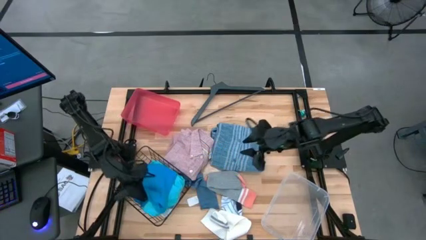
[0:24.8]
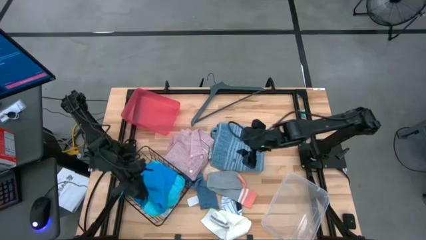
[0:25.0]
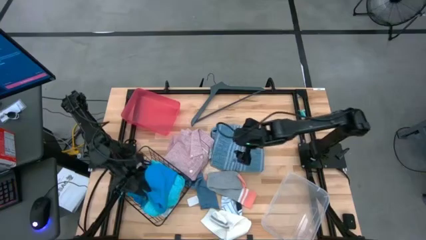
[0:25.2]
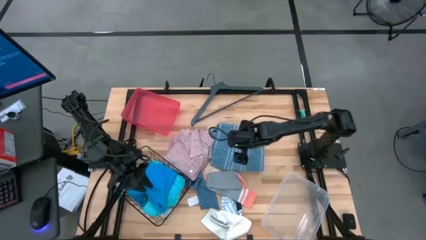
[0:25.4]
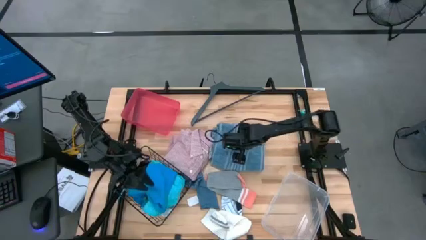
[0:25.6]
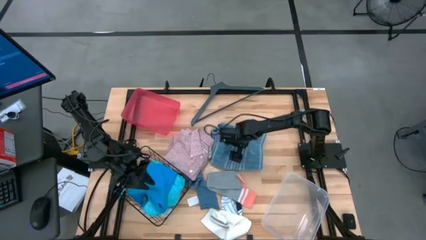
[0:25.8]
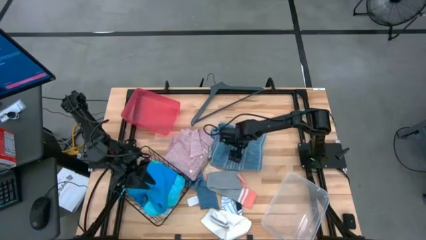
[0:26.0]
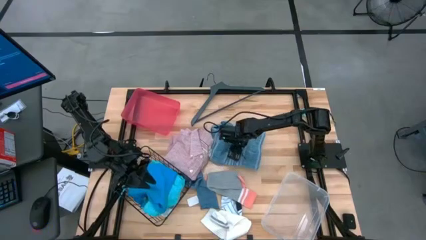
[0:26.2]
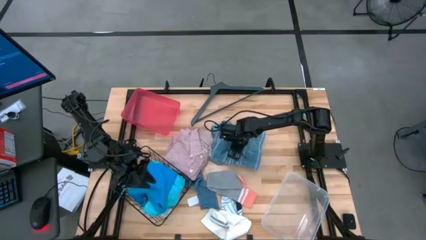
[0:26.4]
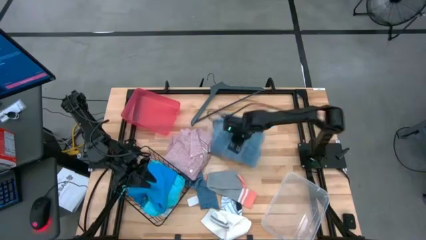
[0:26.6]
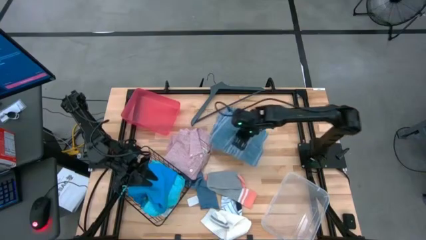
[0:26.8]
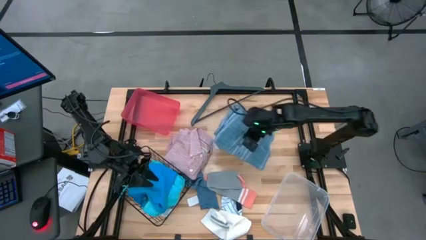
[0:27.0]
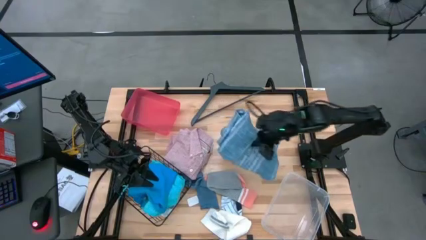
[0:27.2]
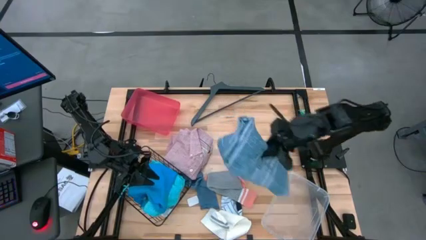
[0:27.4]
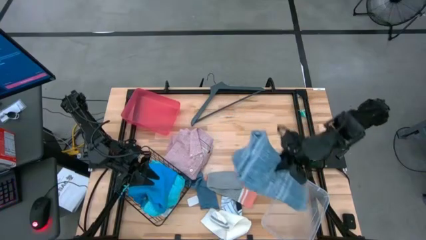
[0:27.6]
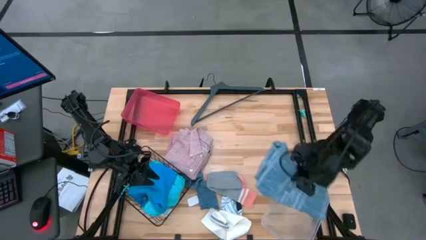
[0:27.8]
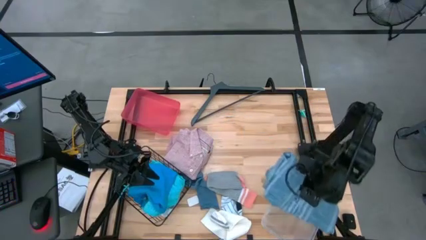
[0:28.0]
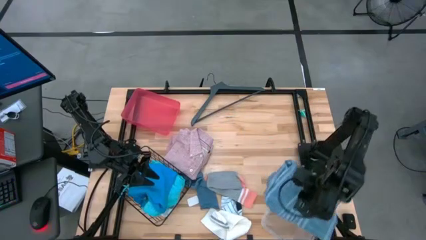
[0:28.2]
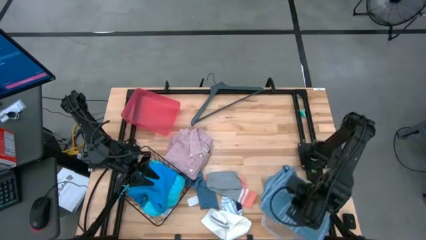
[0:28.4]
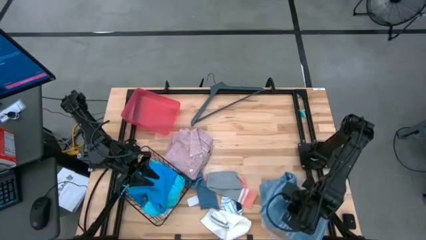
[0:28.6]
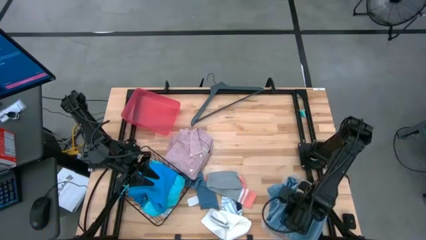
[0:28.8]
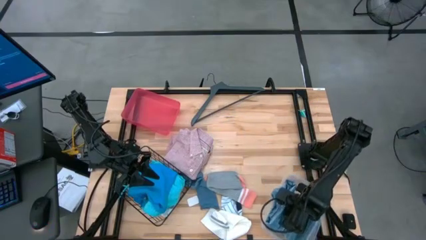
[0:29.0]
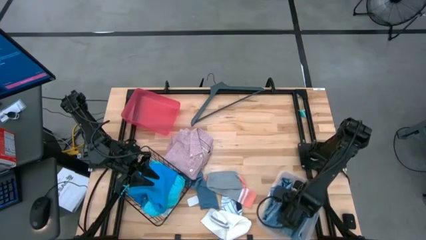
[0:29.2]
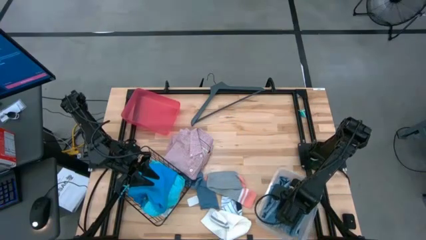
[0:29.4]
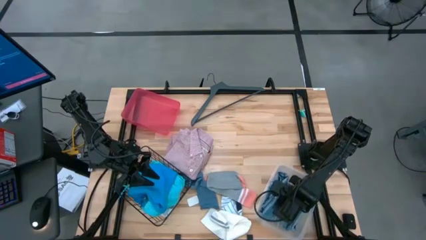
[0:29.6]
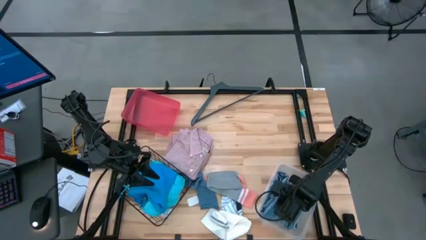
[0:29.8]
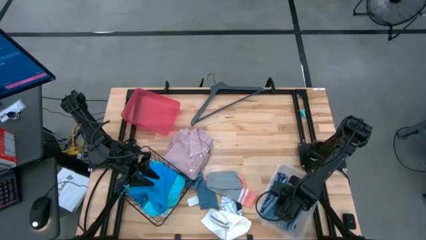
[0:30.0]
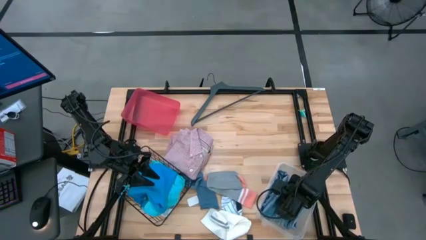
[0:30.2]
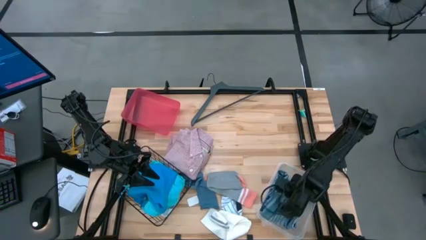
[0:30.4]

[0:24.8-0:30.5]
Task: Pick & Place Cloths
Put the blue polo into the transparent container

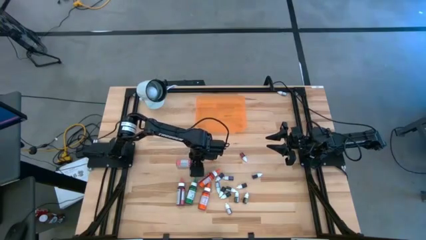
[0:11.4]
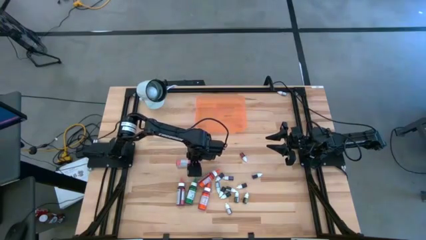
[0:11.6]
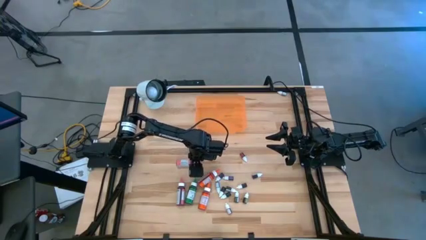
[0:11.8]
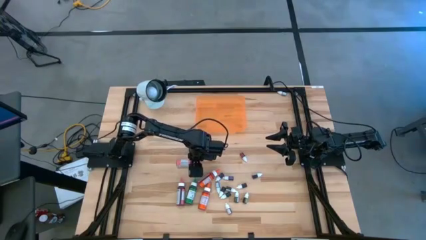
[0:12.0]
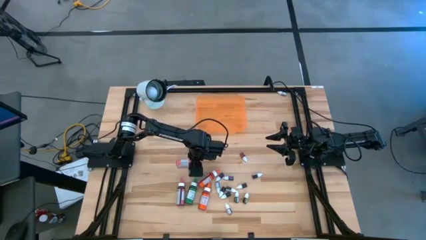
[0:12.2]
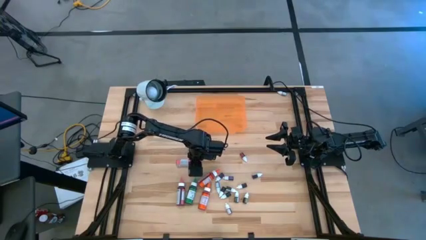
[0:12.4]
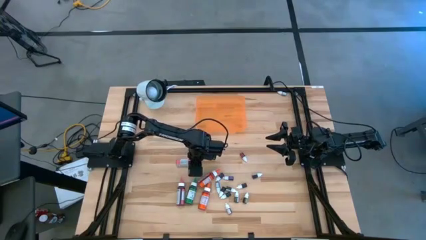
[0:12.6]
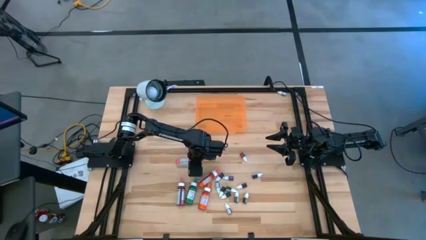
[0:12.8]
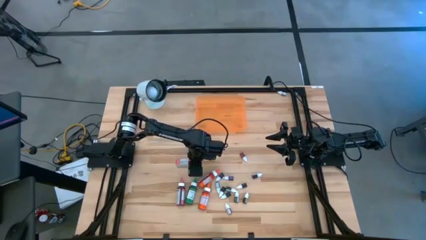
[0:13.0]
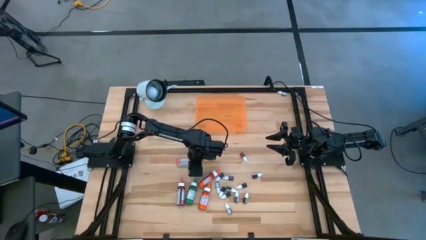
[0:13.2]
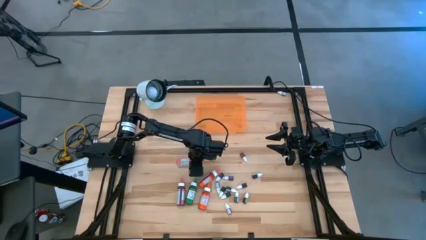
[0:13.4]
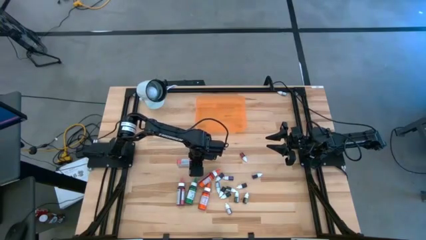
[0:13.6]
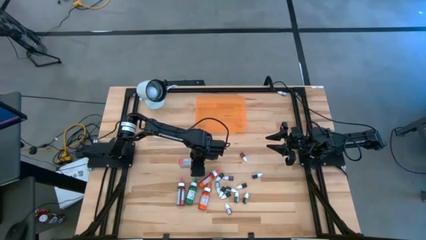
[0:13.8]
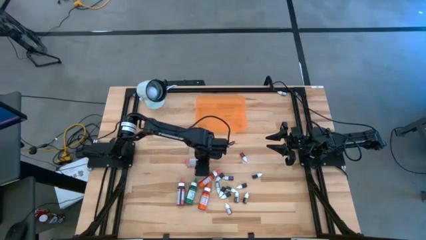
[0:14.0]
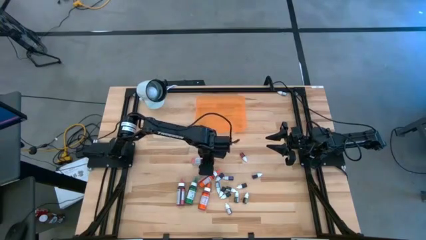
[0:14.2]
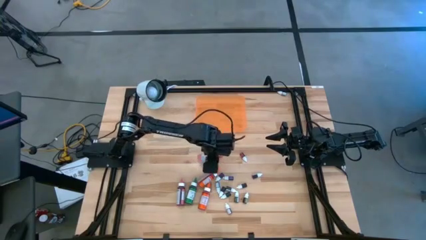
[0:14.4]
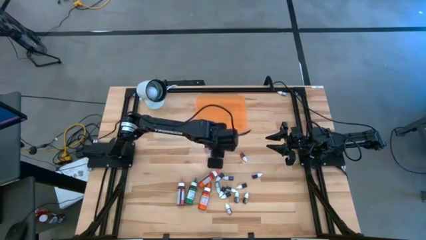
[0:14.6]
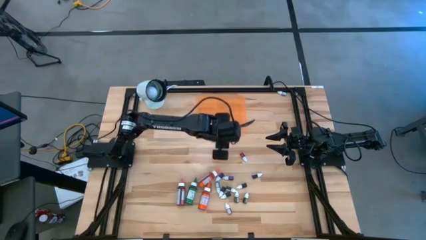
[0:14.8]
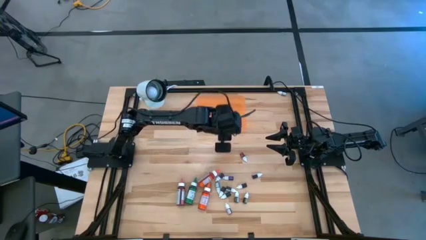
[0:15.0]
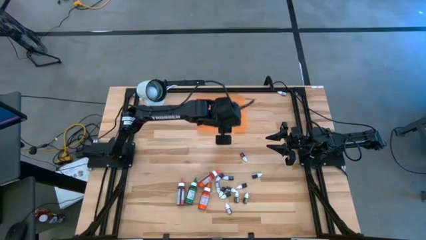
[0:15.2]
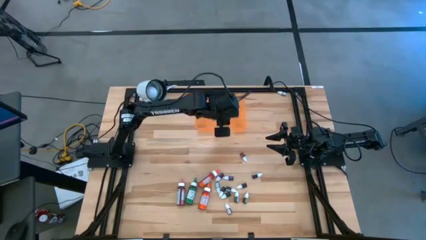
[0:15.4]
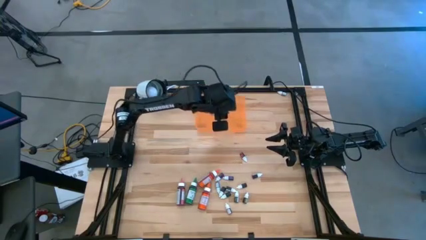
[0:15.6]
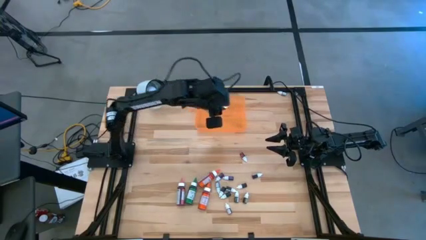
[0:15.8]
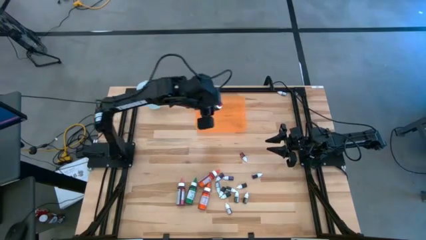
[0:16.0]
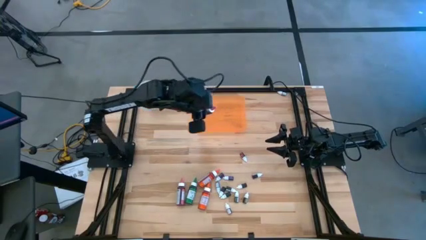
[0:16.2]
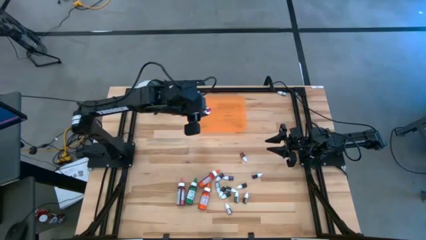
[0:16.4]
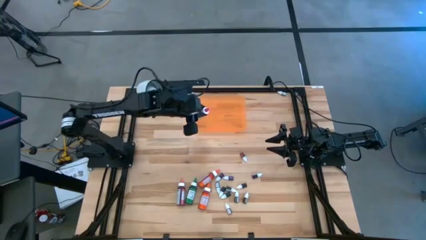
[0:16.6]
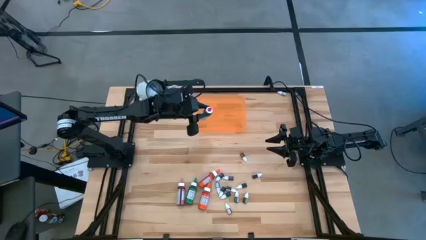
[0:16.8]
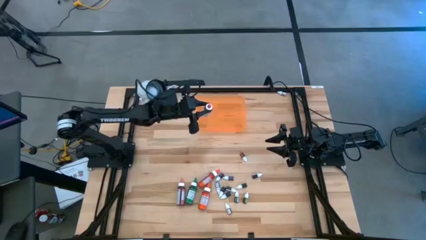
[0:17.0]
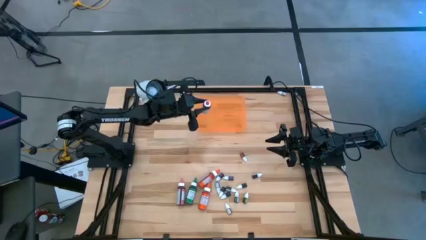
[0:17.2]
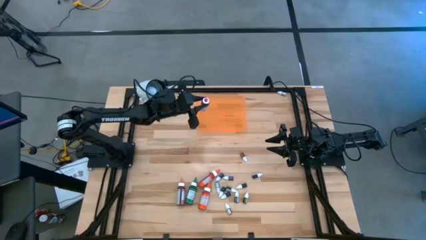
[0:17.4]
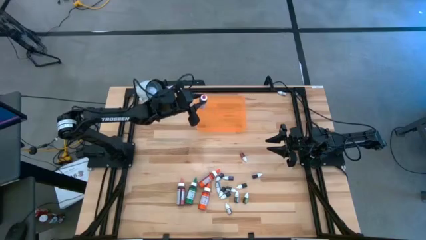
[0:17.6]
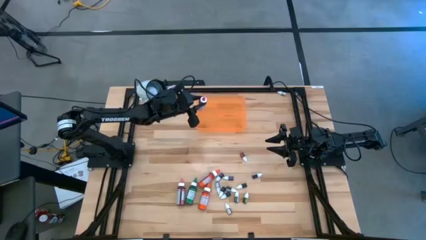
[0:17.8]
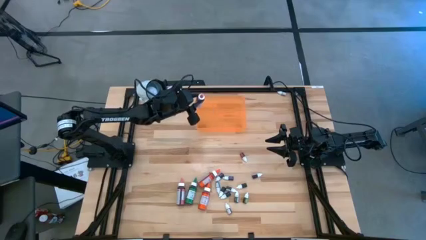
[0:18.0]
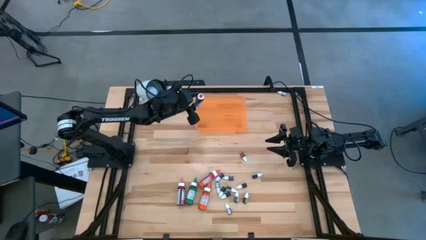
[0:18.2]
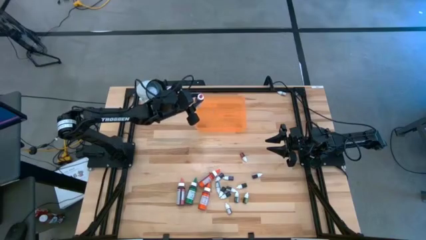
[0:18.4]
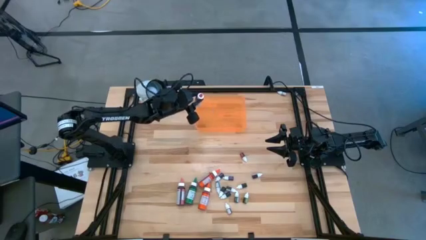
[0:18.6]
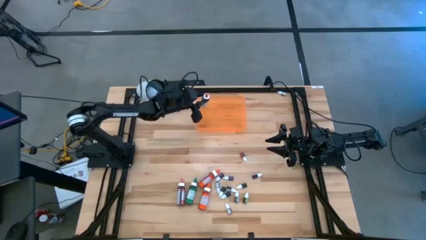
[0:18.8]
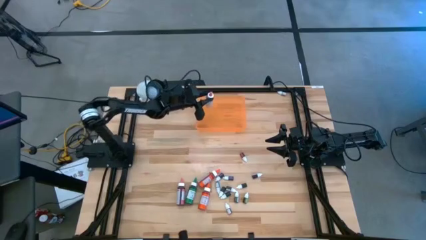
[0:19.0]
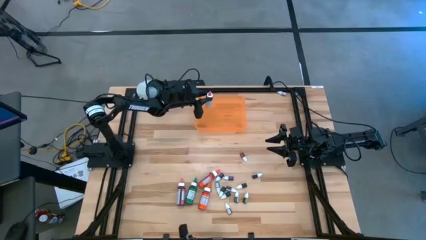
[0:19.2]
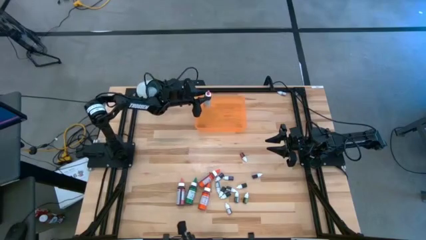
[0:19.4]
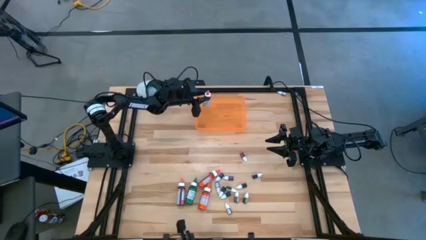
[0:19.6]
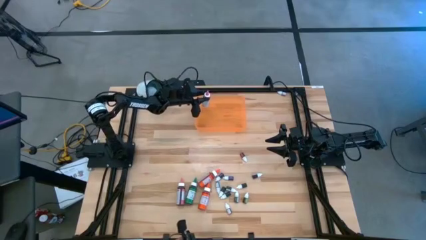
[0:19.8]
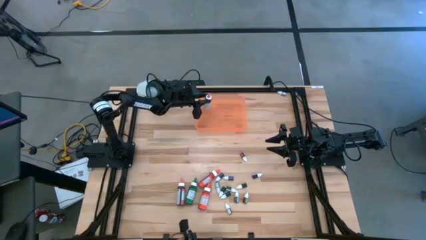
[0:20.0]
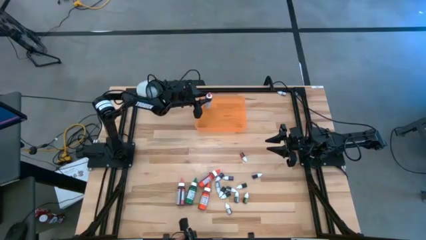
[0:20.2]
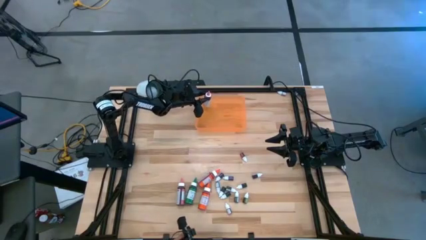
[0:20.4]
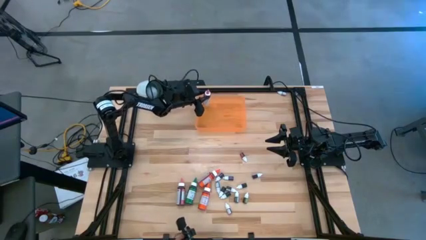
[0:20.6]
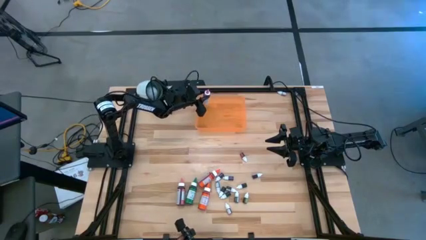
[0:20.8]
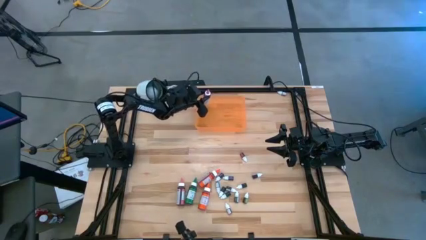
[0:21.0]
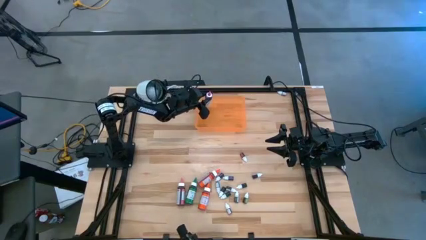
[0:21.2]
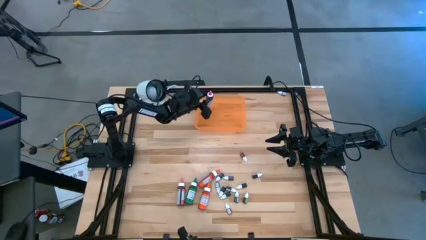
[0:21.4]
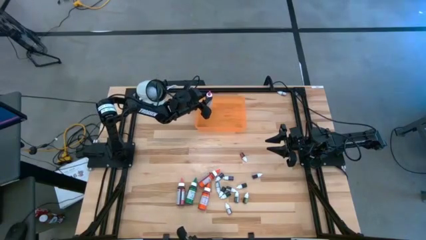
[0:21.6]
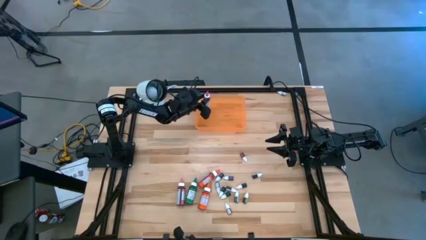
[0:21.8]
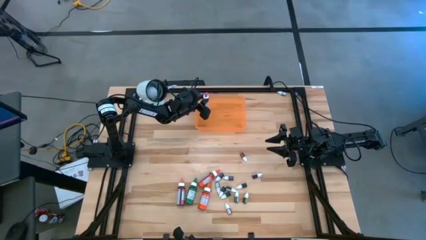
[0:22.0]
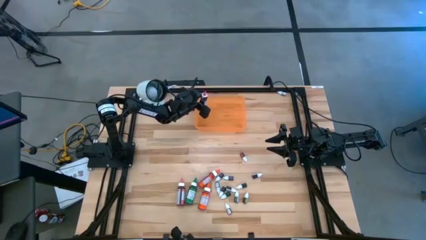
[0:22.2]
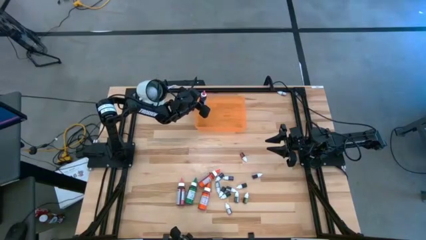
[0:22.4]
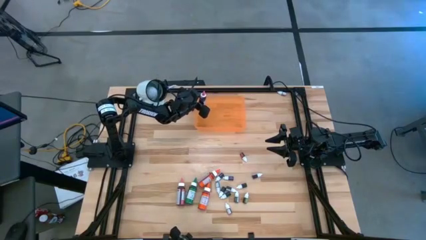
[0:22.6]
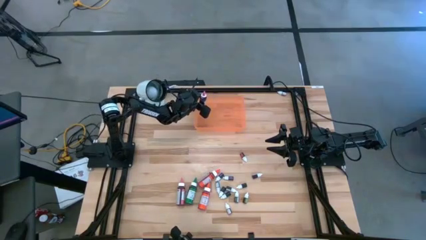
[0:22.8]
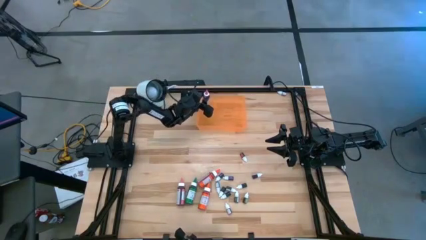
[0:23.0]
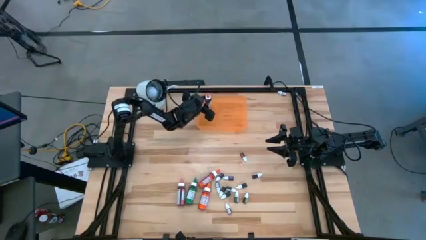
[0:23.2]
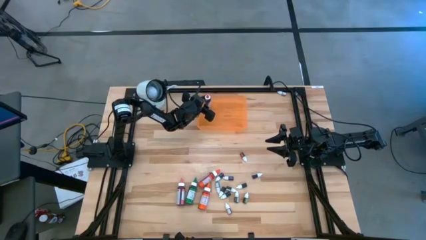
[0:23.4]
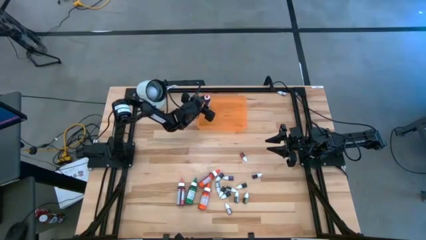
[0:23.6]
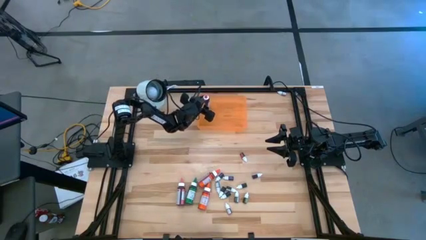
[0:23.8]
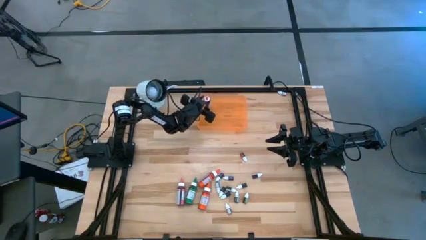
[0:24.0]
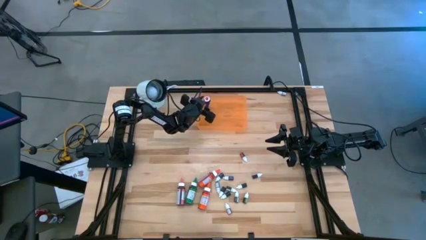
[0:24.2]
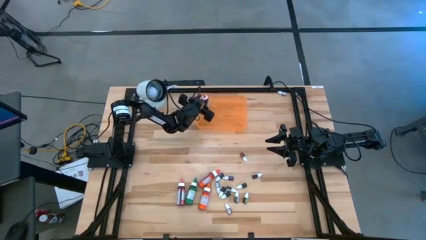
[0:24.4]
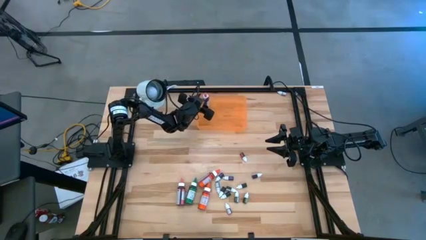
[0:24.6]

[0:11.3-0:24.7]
Task: Pick & Place food coloring
Put the large pink food coloring bottle into the orange bin
